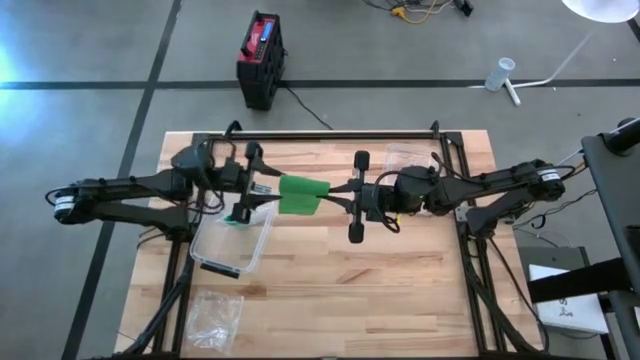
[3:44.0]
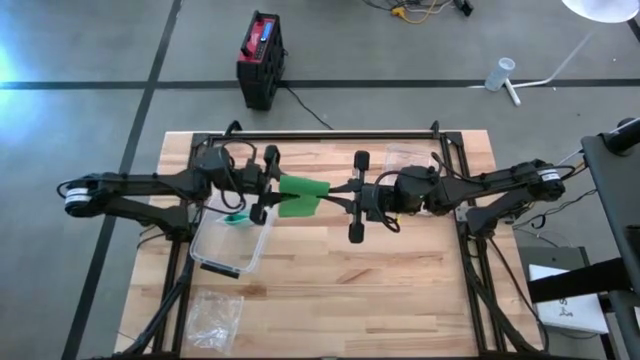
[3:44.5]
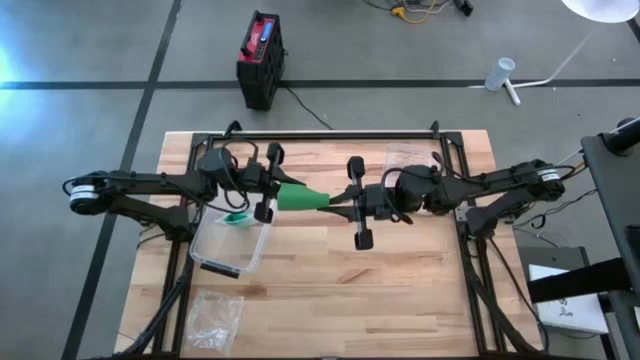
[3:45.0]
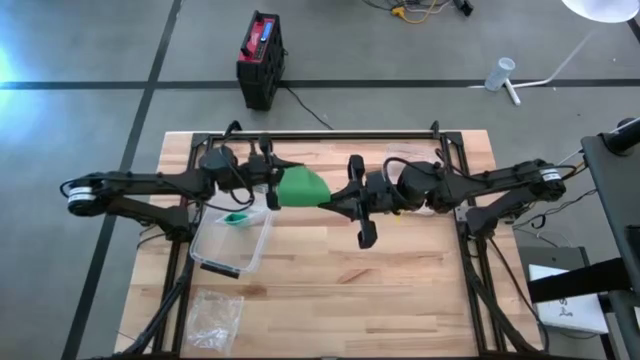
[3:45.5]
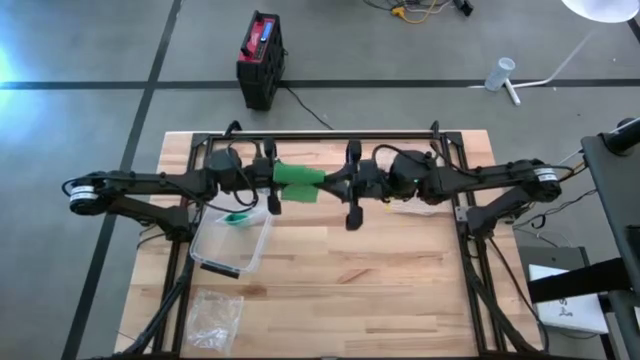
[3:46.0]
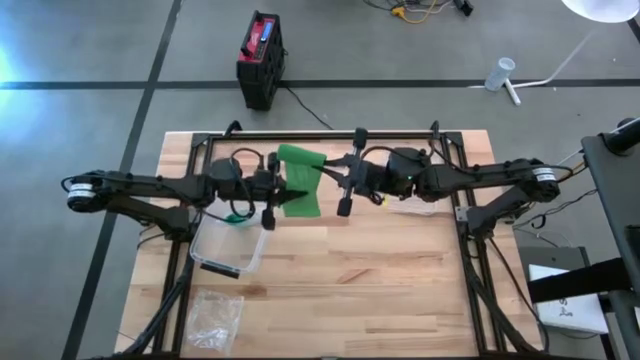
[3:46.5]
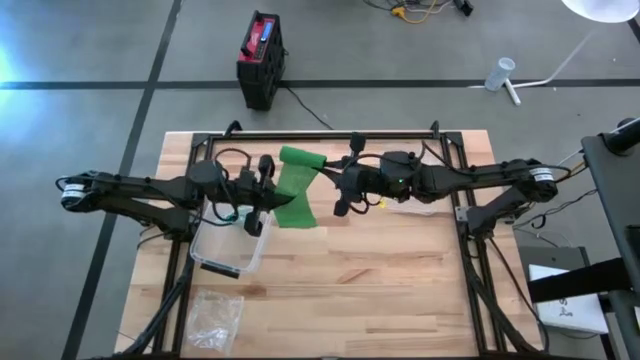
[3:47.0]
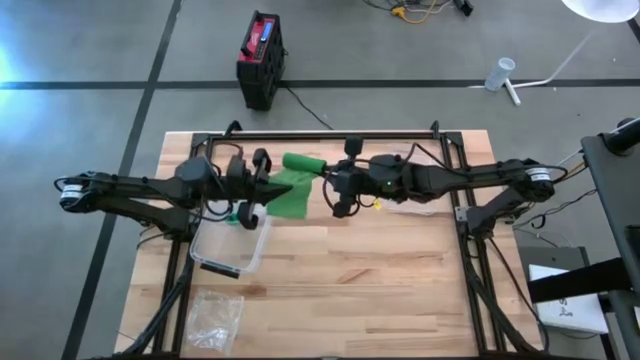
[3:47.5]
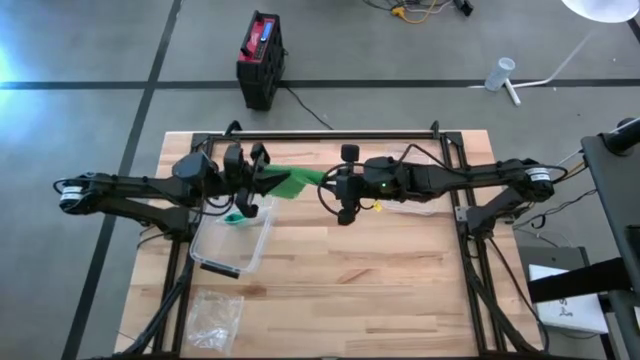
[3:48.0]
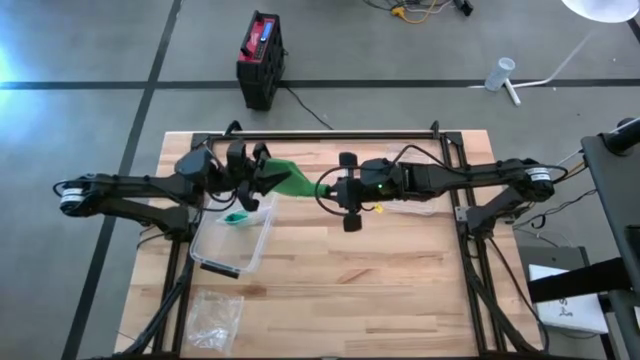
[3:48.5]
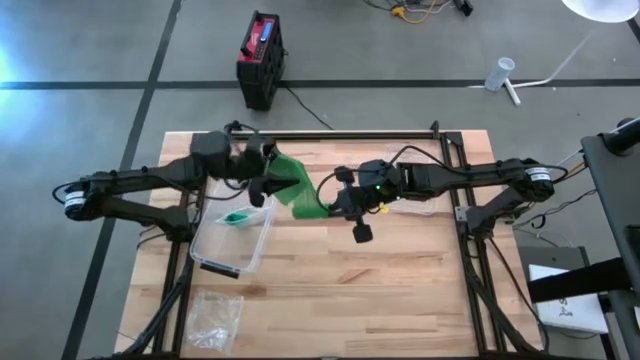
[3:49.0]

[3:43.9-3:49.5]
Task: Roll bandage
Roll the dark green bandage

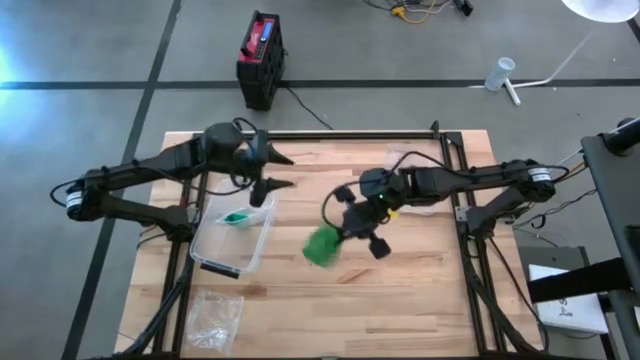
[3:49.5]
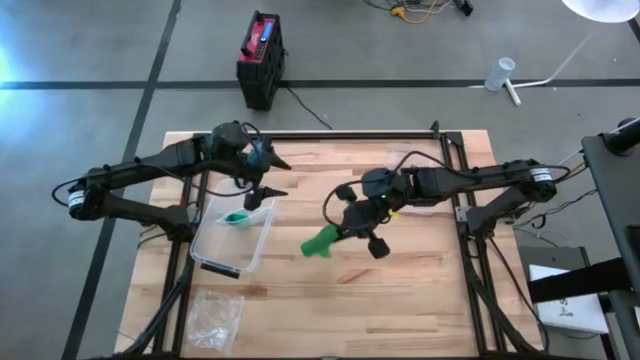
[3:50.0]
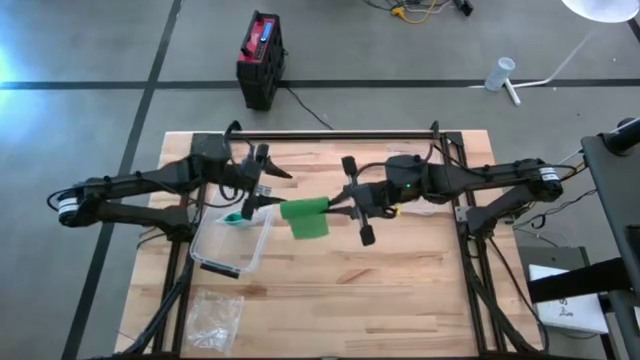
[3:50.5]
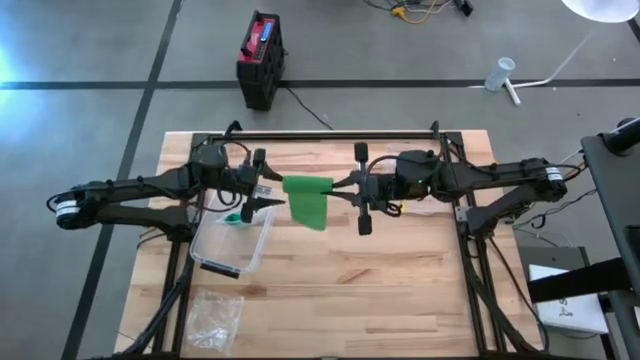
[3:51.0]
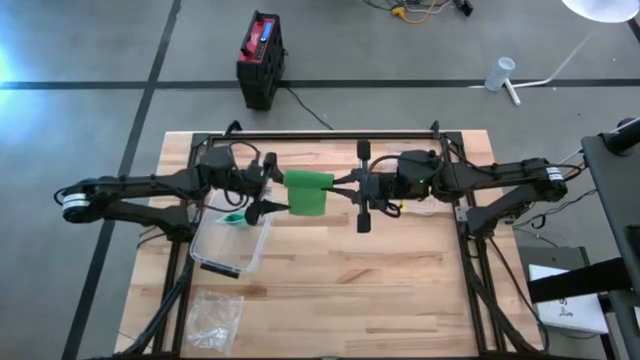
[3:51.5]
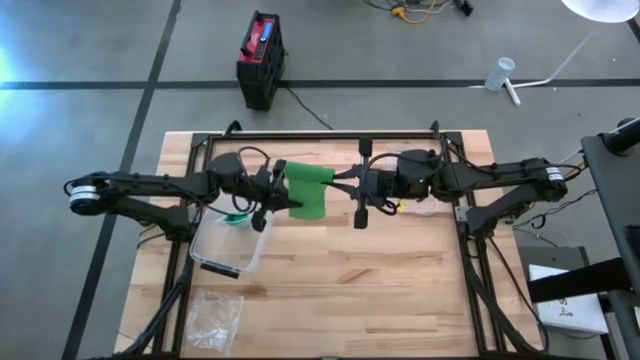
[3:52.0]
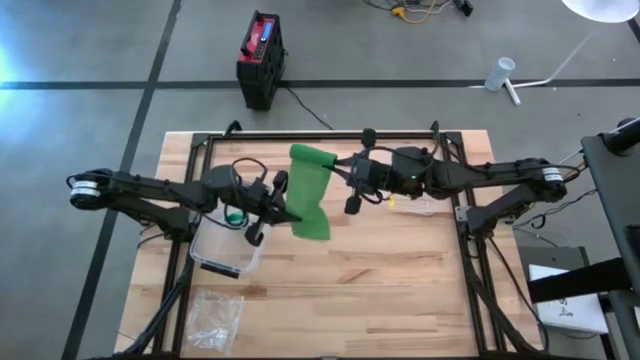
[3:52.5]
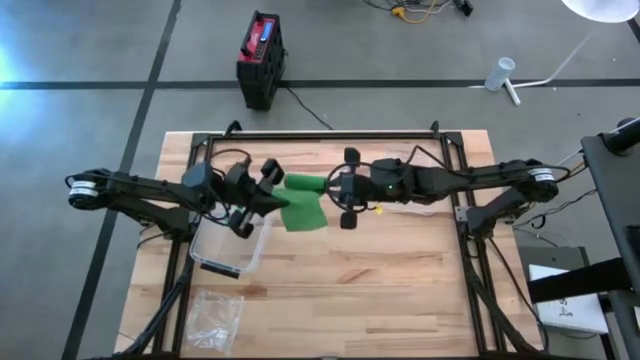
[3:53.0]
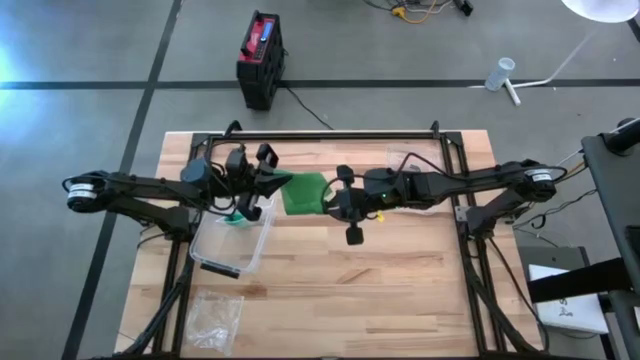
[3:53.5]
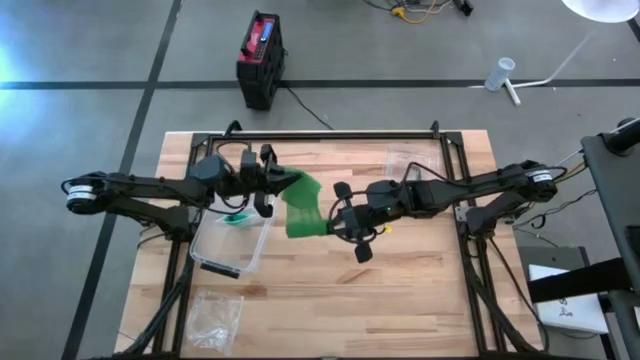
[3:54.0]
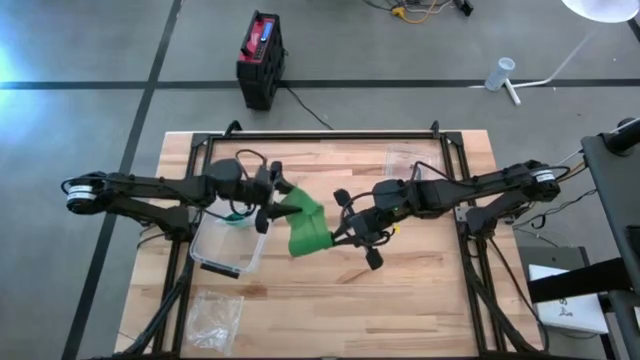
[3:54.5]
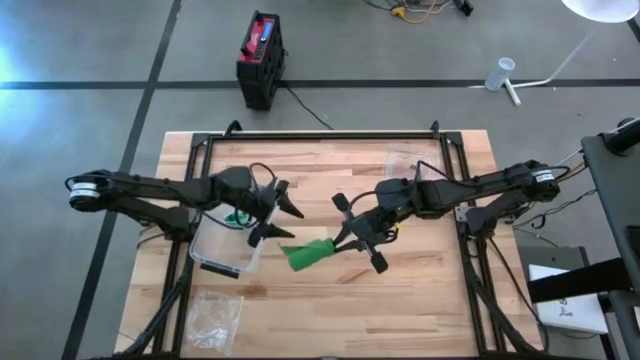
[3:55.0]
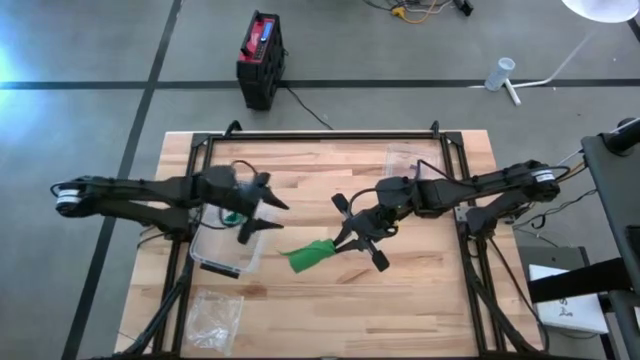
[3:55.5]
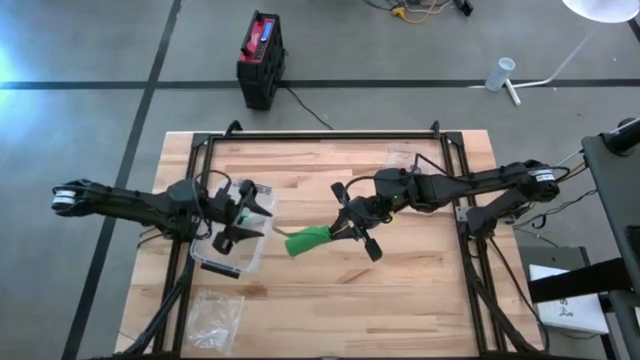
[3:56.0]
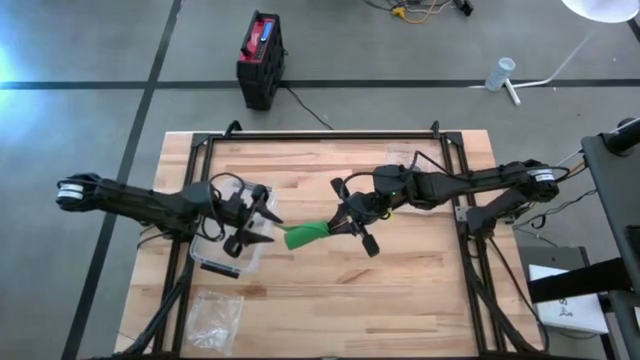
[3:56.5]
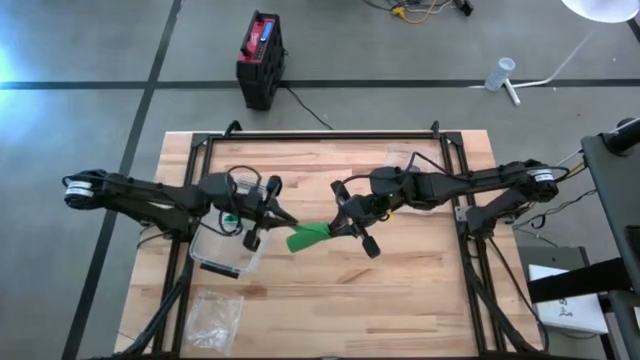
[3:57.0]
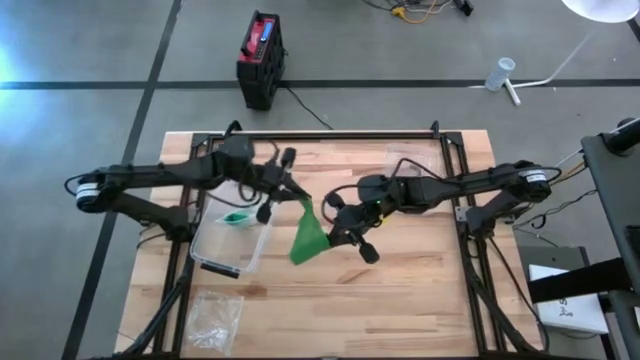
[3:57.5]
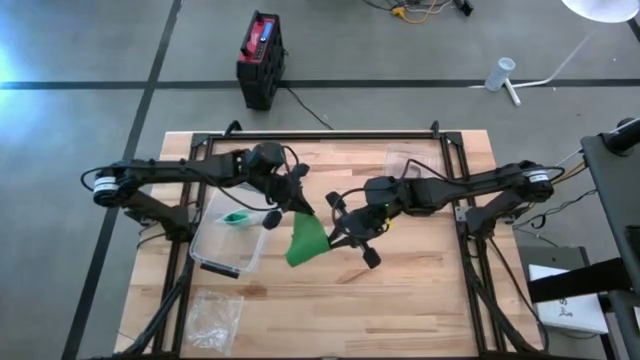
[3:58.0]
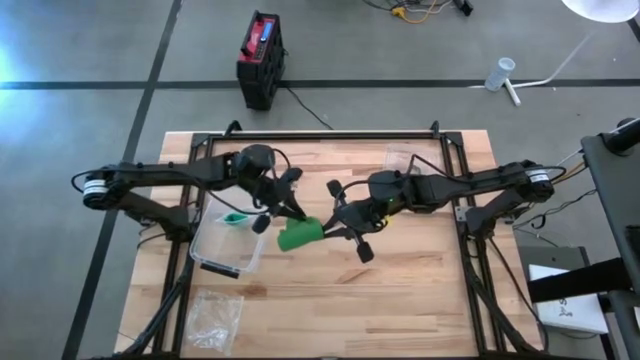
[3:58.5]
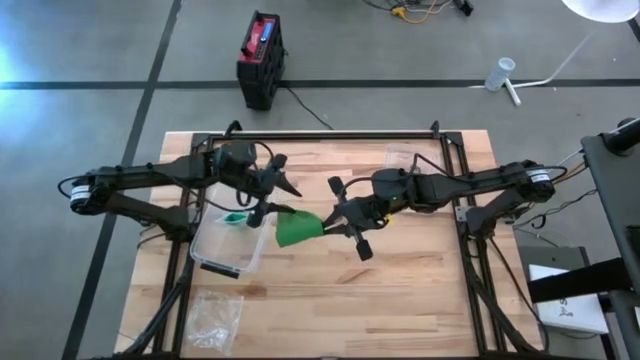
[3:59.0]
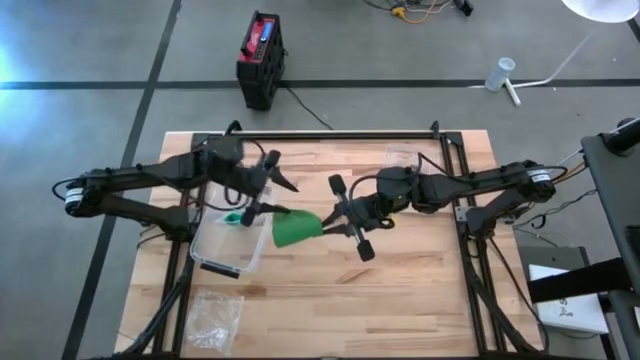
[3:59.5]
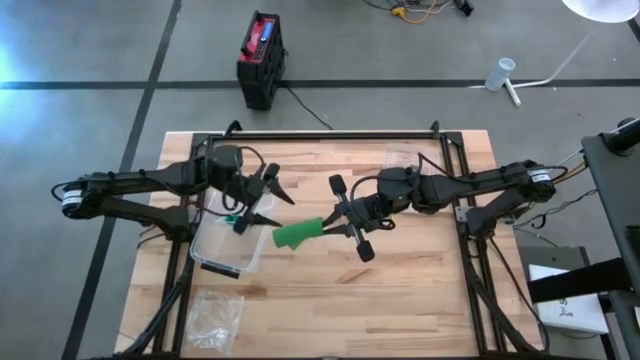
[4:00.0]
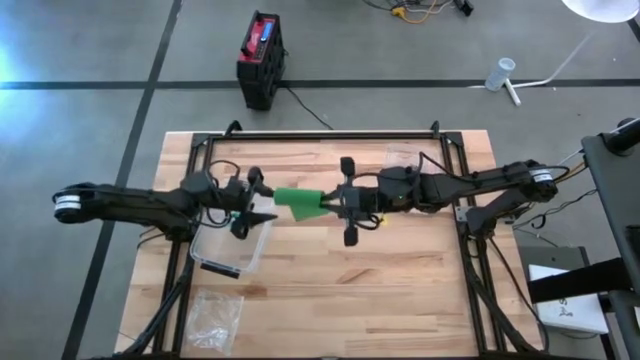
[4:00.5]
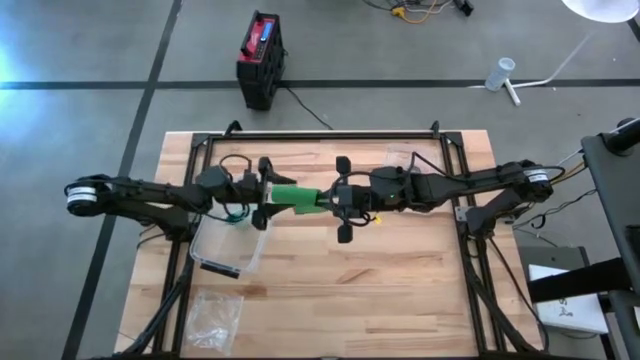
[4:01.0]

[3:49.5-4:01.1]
Roll the dark green bandage

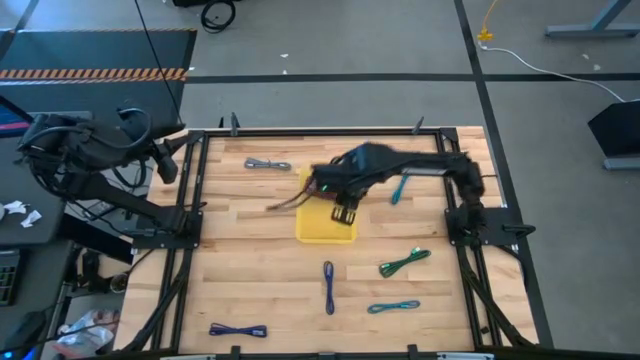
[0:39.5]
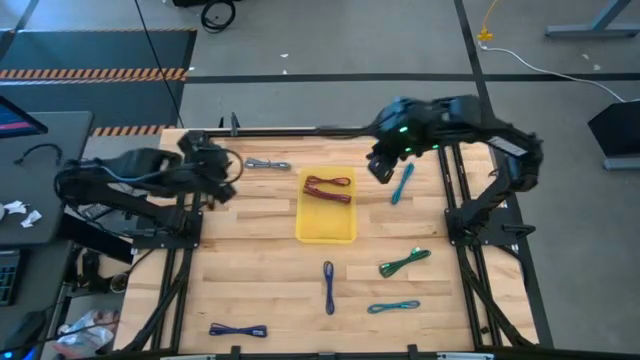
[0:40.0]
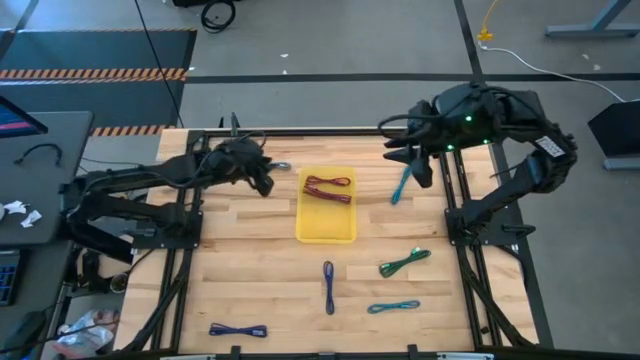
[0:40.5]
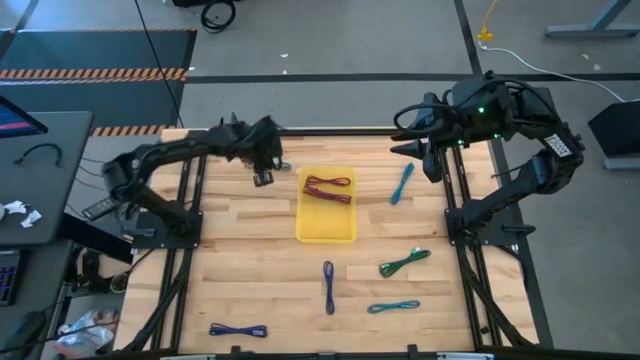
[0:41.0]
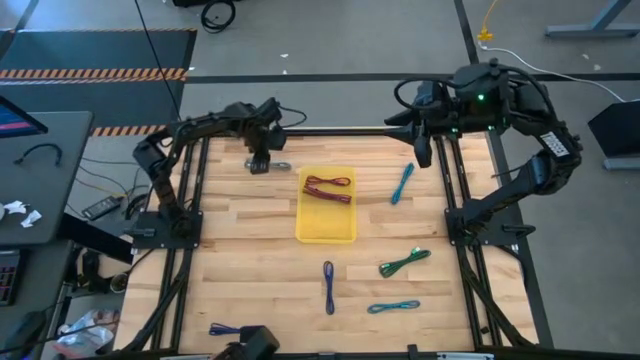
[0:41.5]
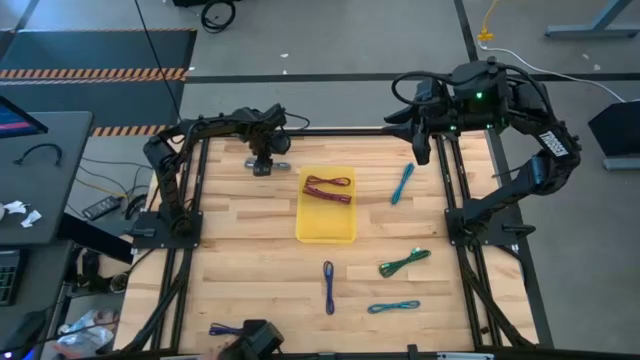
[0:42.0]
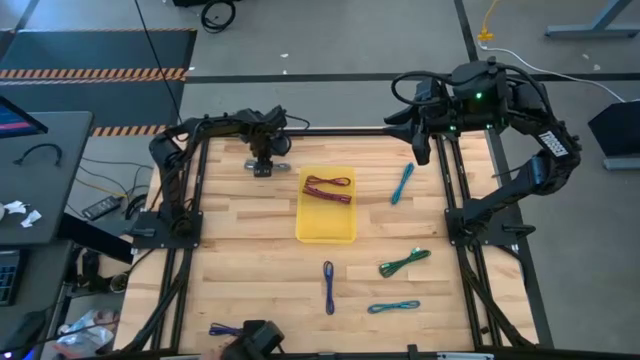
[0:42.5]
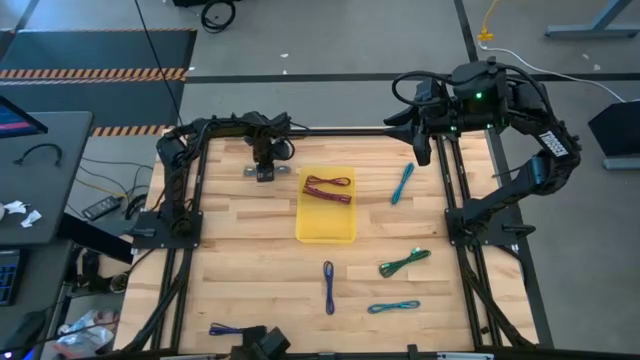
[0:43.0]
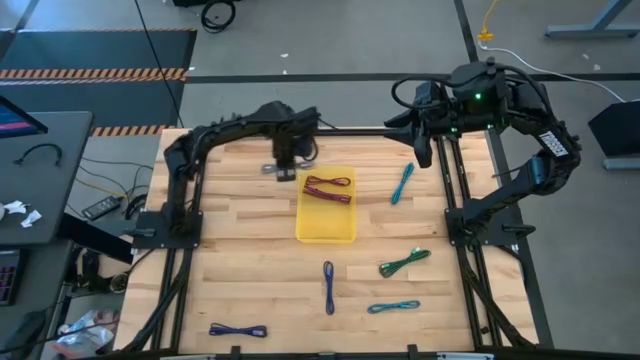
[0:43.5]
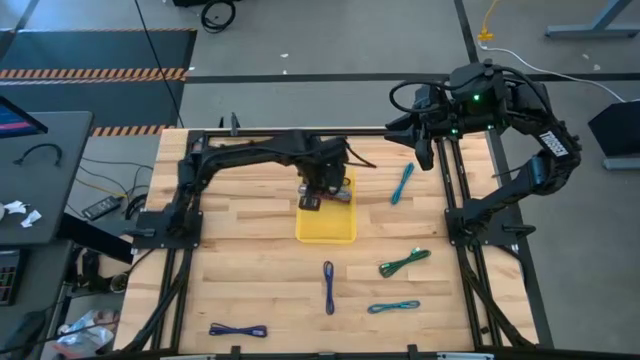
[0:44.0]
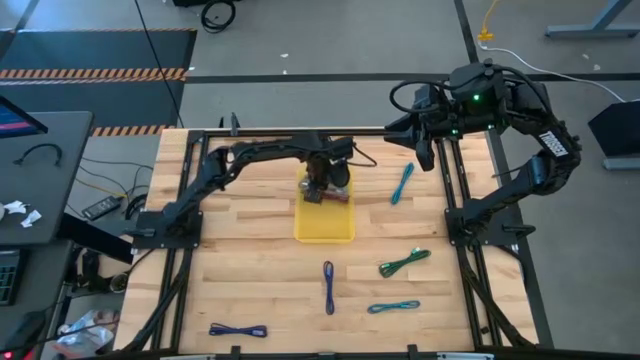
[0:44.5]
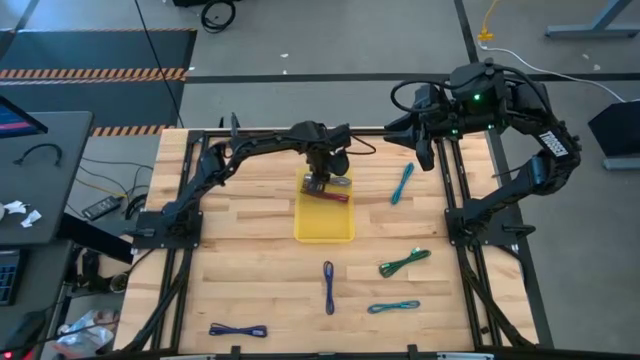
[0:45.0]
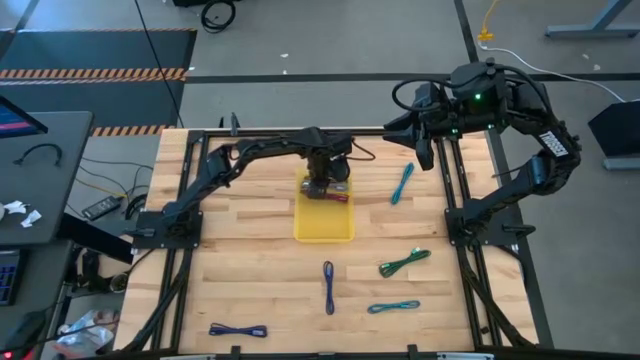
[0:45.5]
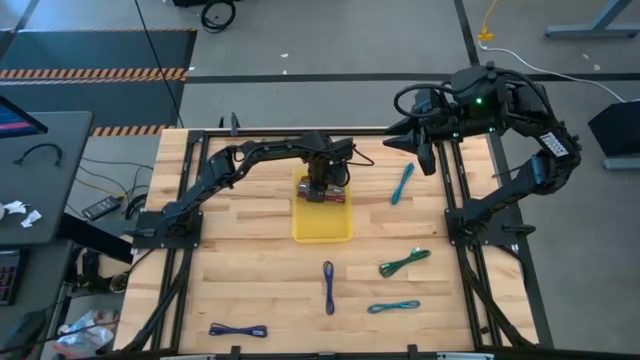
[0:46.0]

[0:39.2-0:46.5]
Task: Pick and place USB-C Cables
Put the white charger cable into the yellow bin
